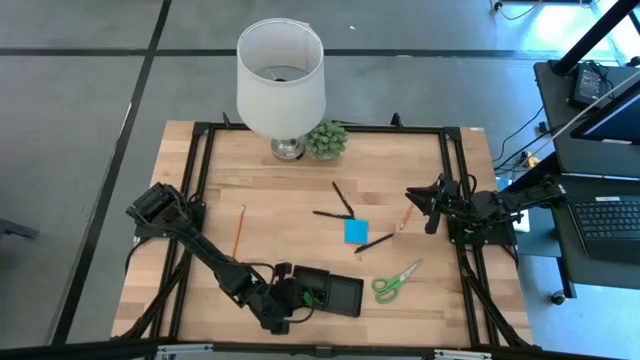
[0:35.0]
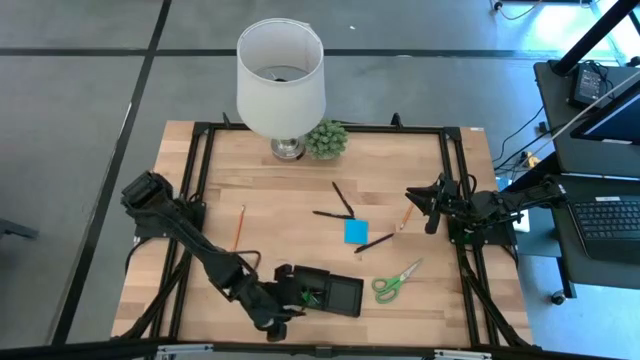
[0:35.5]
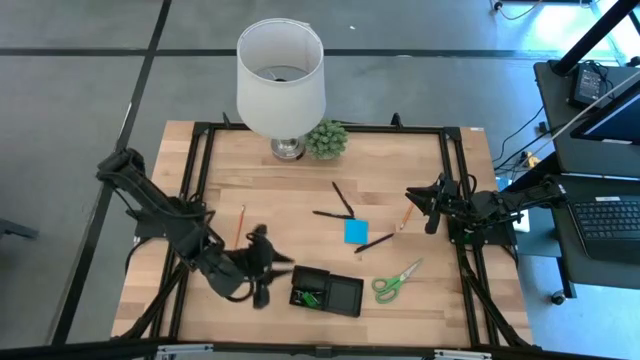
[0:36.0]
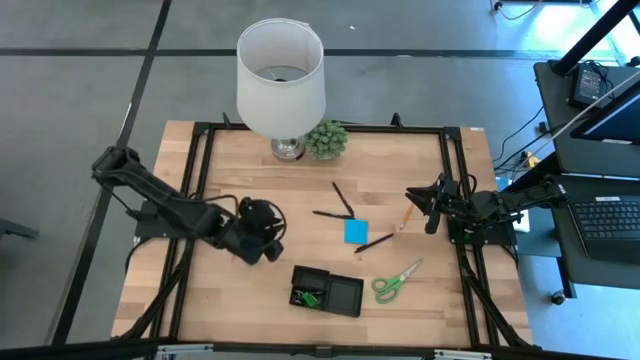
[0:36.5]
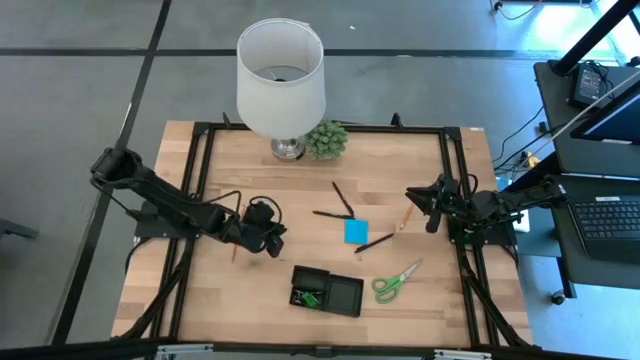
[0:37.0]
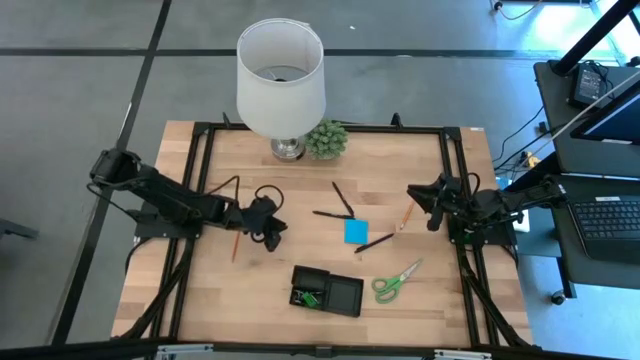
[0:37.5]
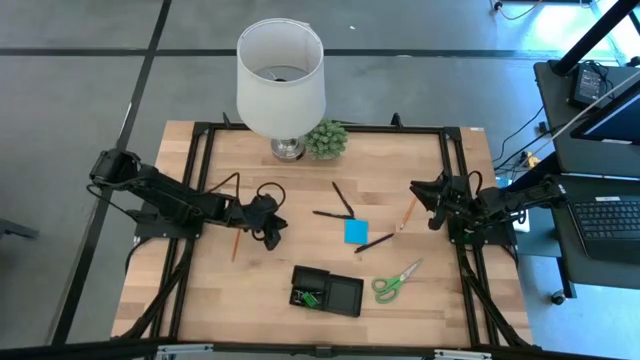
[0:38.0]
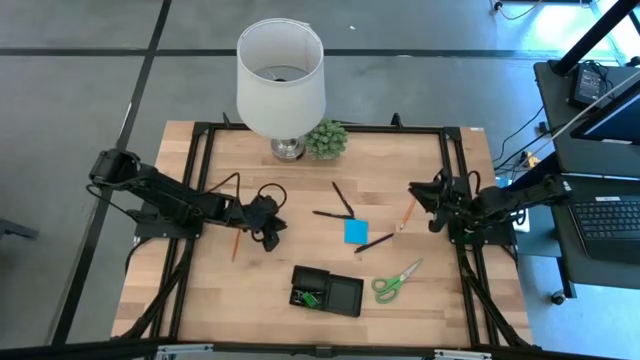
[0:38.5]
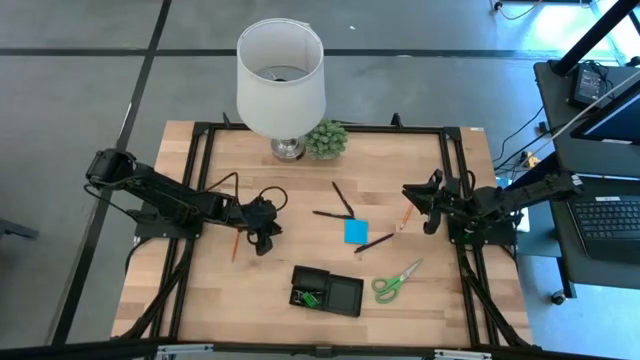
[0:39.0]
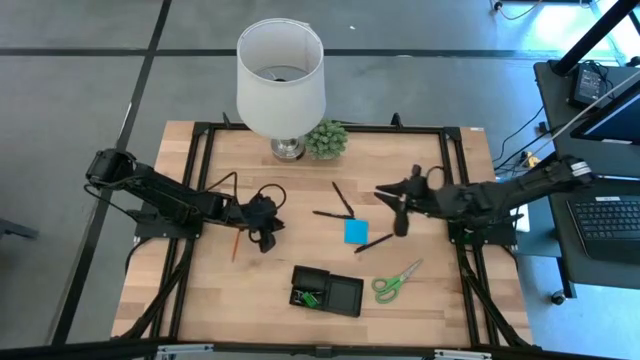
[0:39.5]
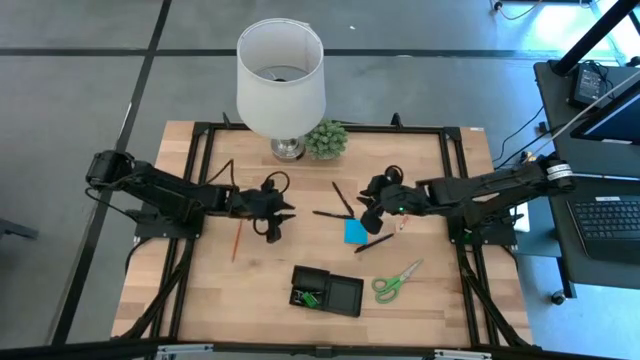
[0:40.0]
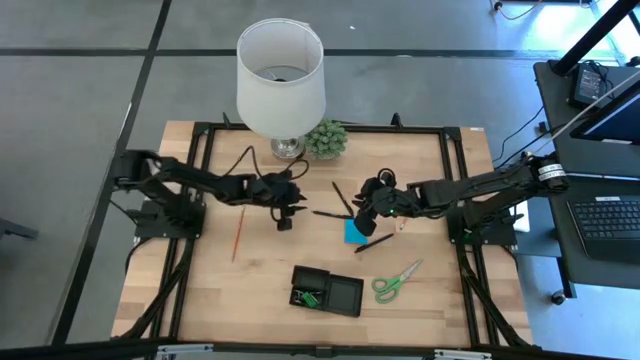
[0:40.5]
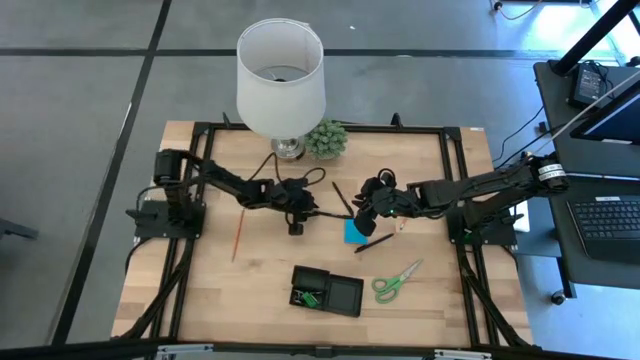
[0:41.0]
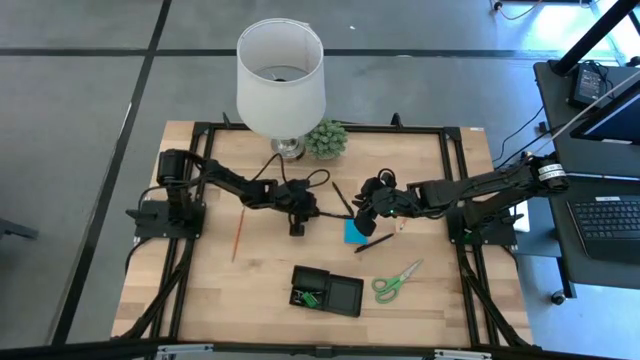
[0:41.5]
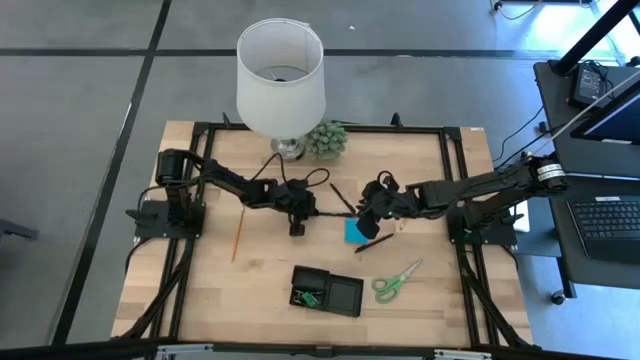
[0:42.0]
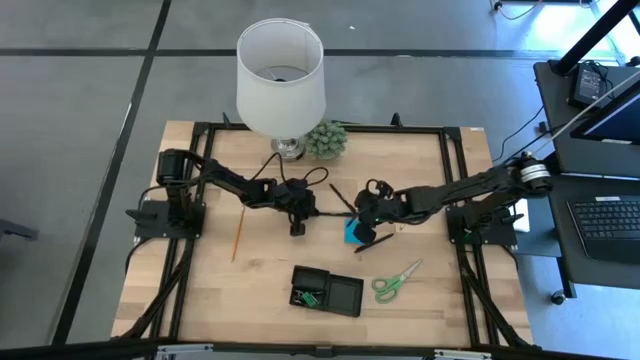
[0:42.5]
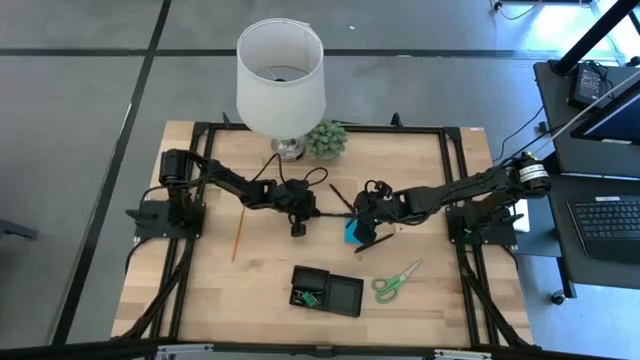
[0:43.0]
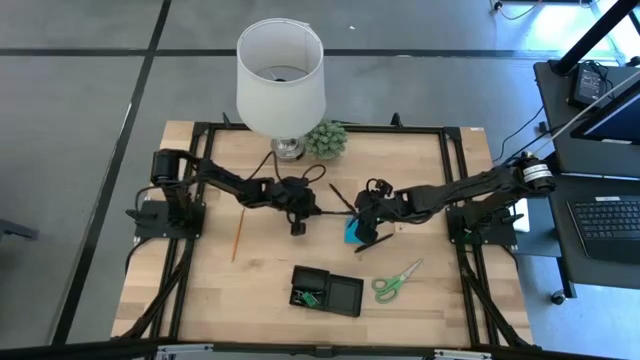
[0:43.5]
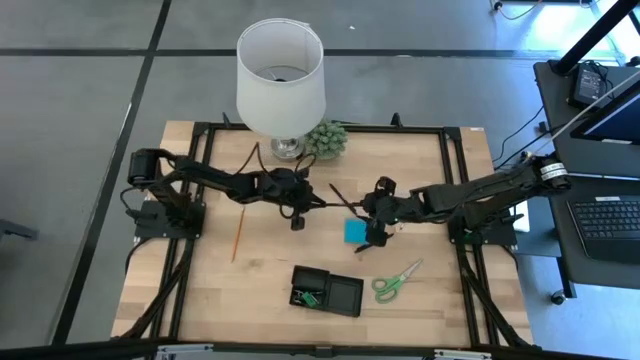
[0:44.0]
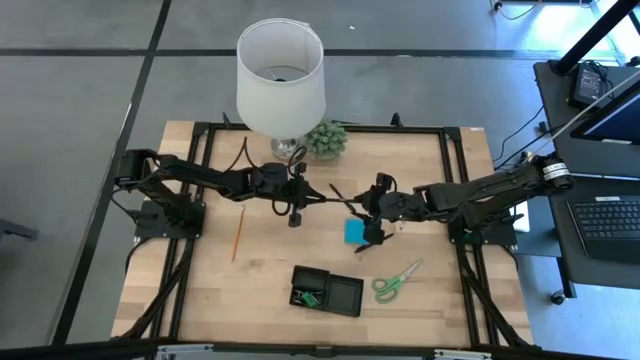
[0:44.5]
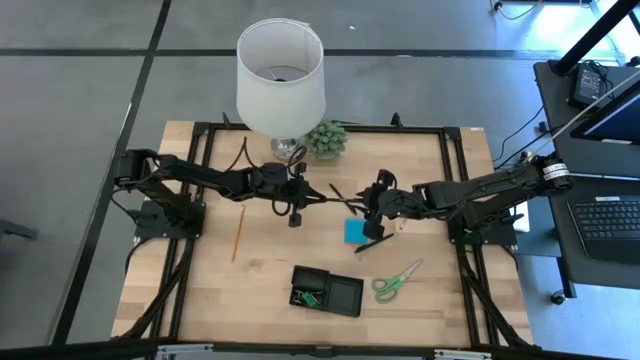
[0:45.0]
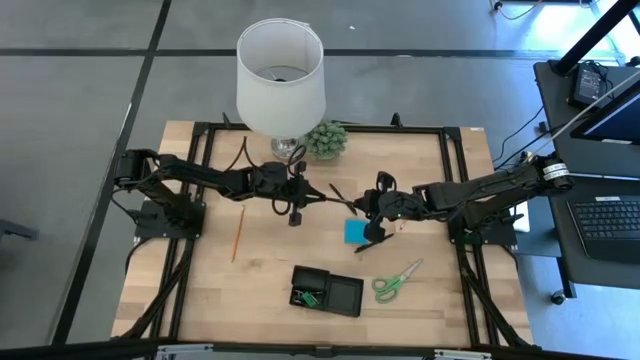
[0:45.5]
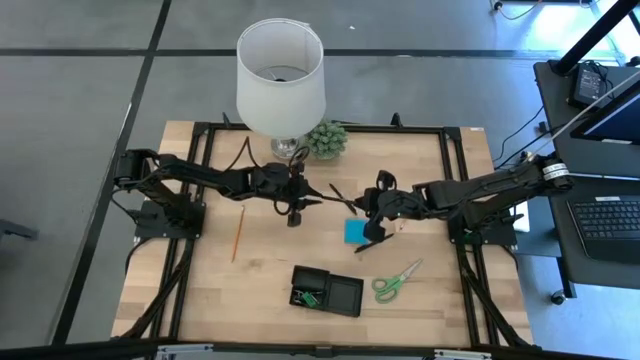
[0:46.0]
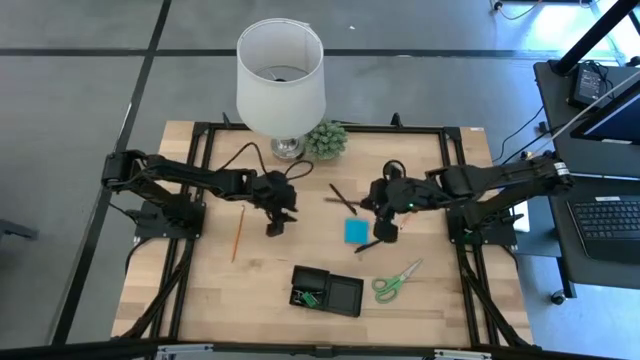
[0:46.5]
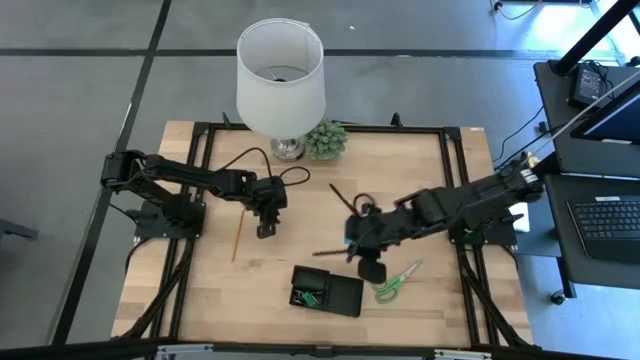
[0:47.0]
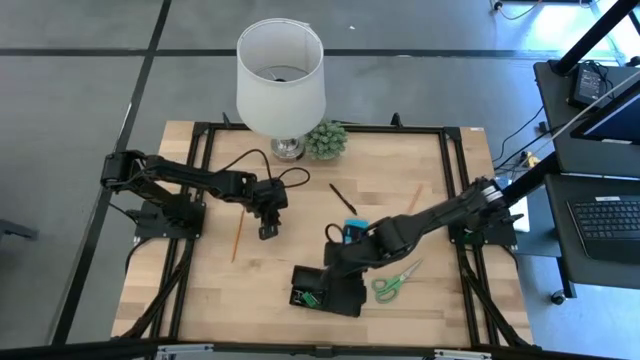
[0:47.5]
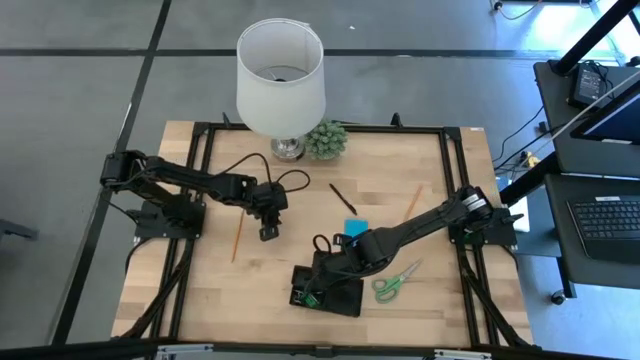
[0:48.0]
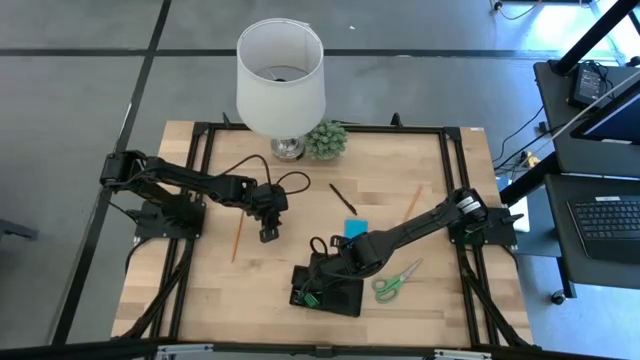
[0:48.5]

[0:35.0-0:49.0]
Task: Pick and place office supplies into organizer
Put the center black pen into the desk organizer

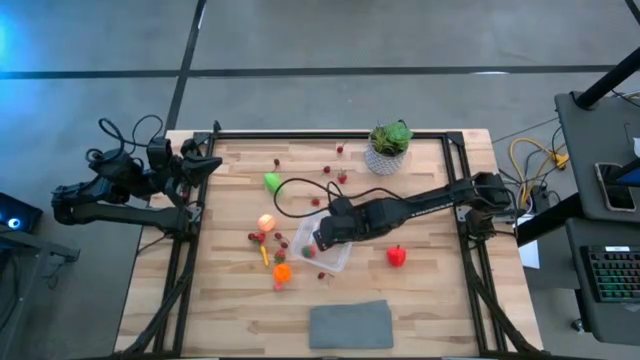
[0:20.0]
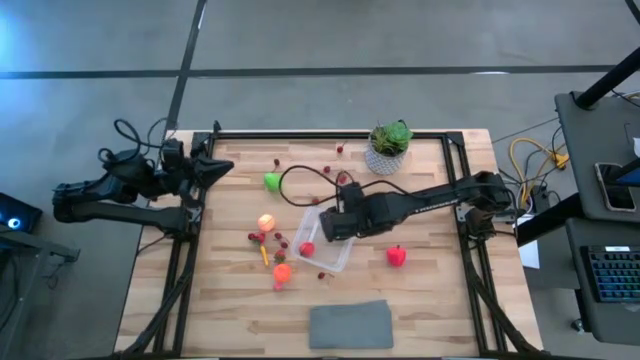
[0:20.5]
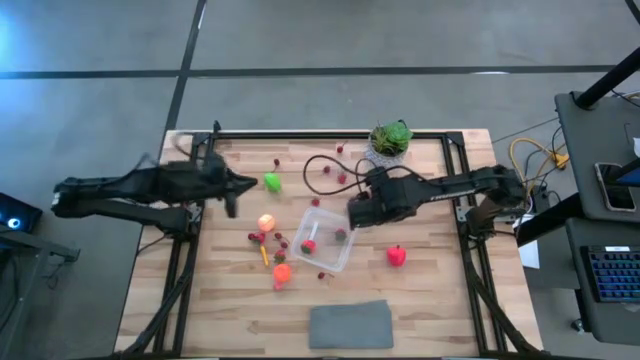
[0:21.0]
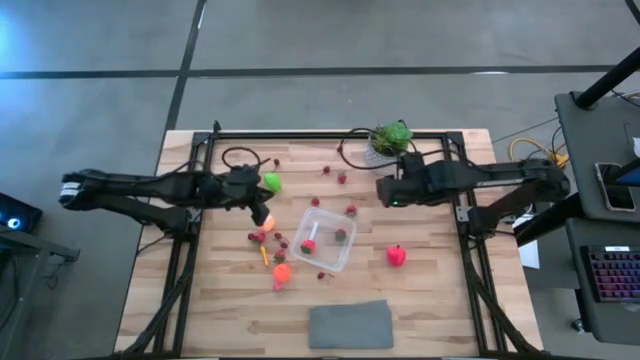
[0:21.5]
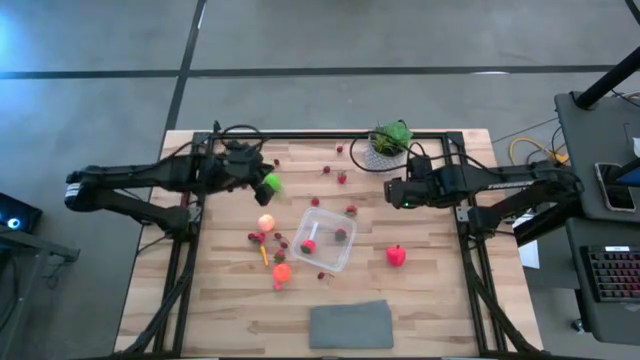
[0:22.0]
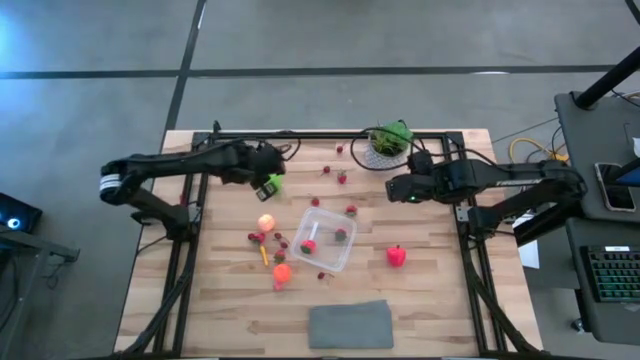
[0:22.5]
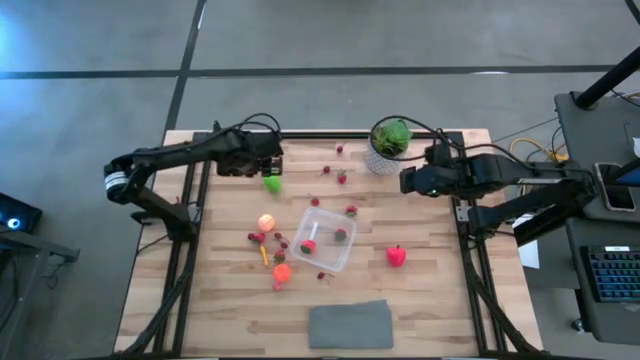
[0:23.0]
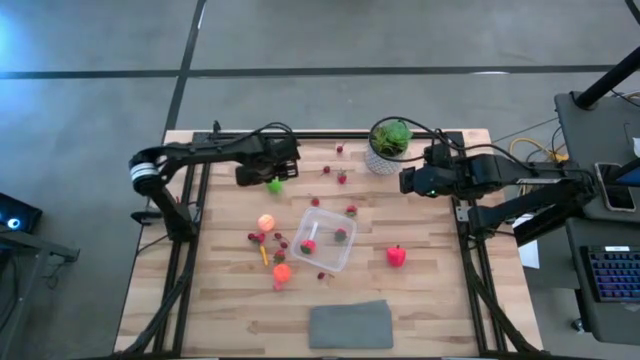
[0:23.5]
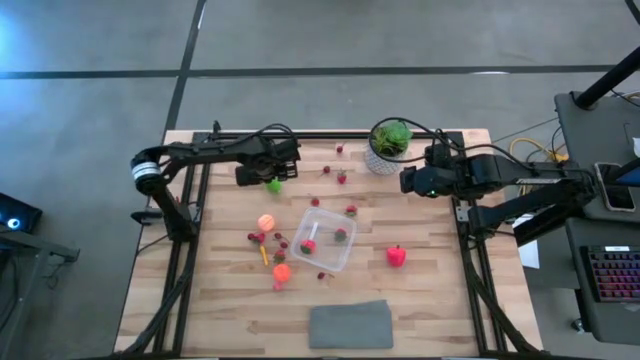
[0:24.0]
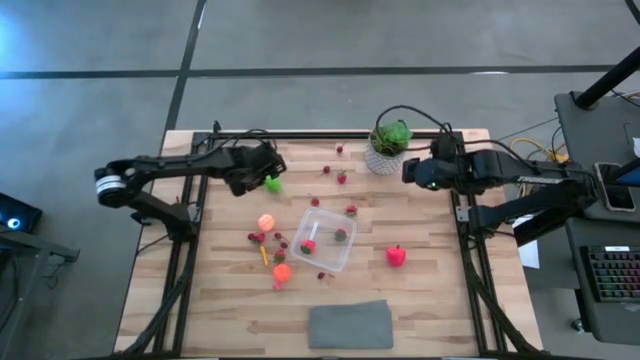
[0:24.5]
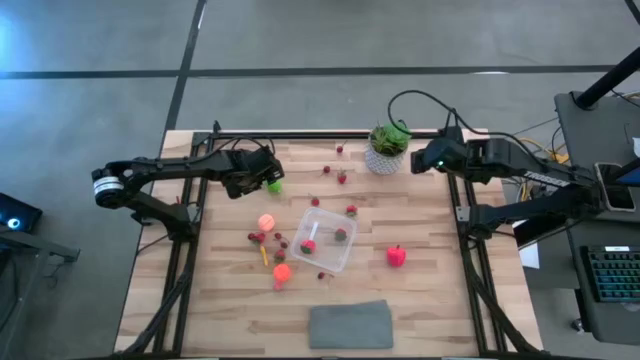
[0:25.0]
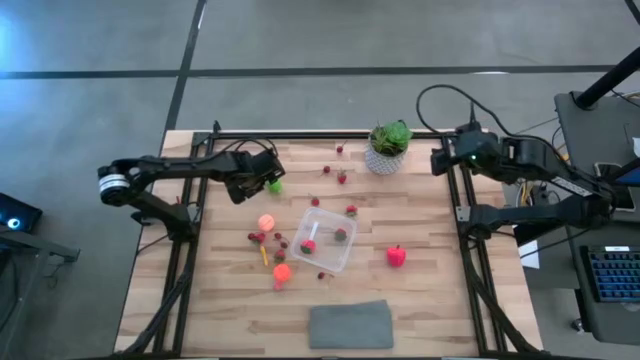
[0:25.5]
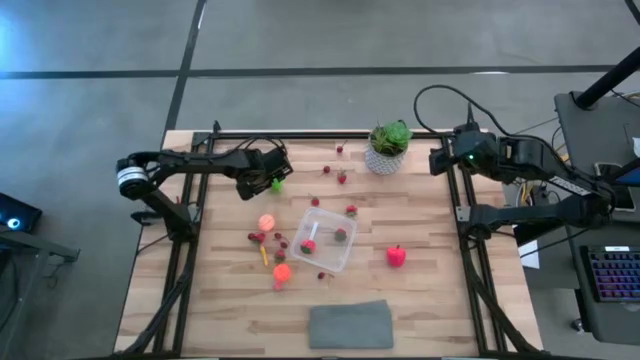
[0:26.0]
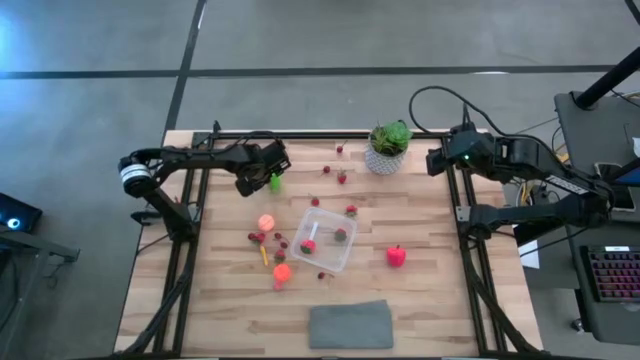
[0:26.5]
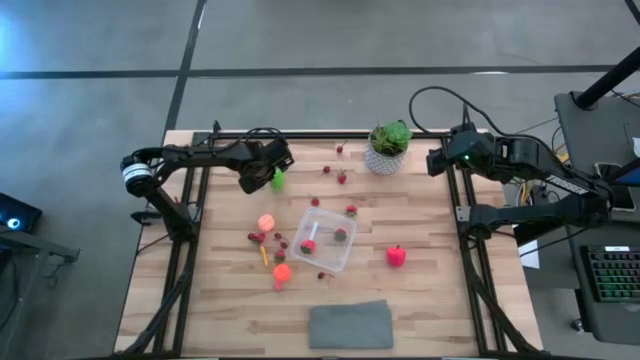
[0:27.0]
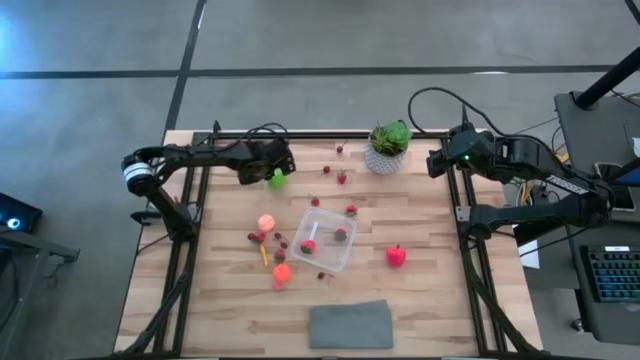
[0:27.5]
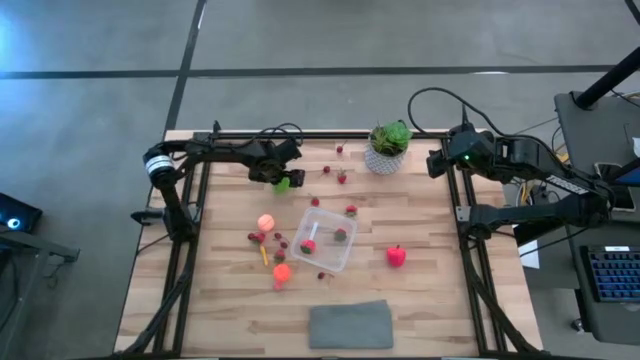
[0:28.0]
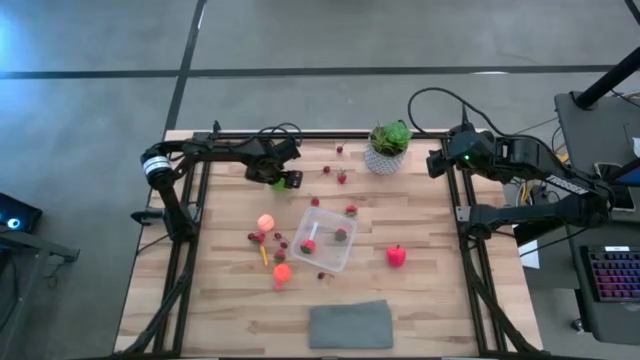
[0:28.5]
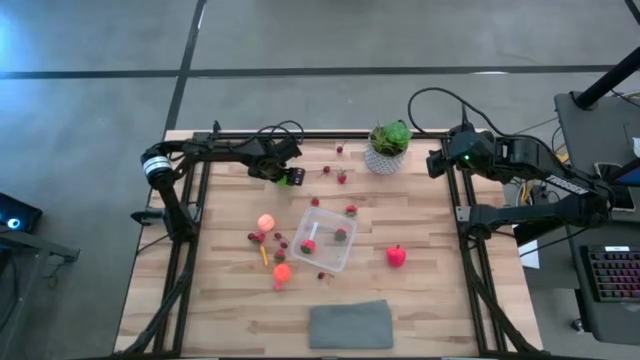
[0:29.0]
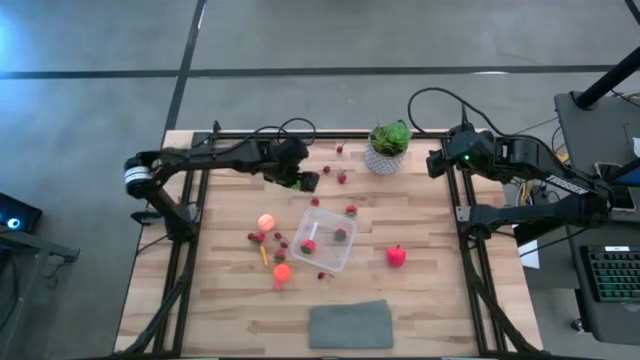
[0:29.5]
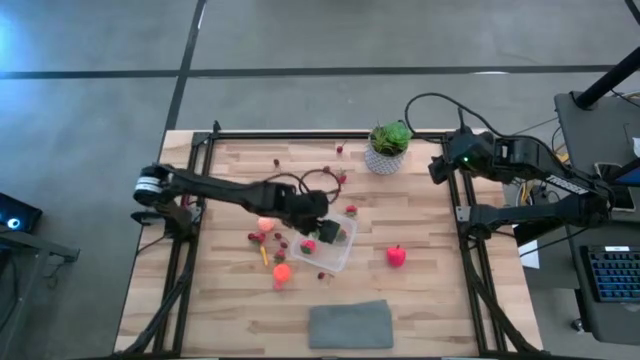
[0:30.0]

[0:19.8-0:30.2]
Task: Pick and placing Produce into tupperware
Put the melon into the transparent container
